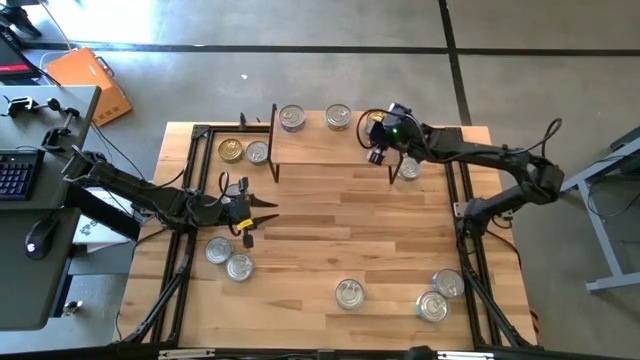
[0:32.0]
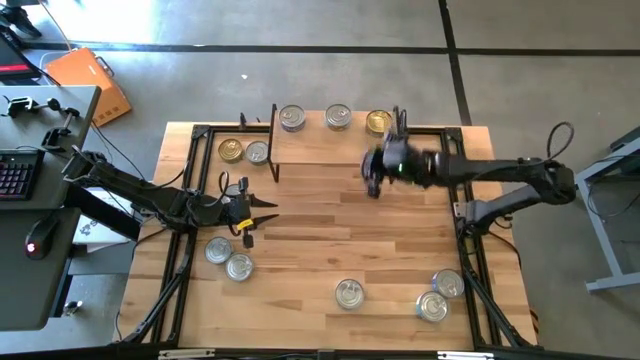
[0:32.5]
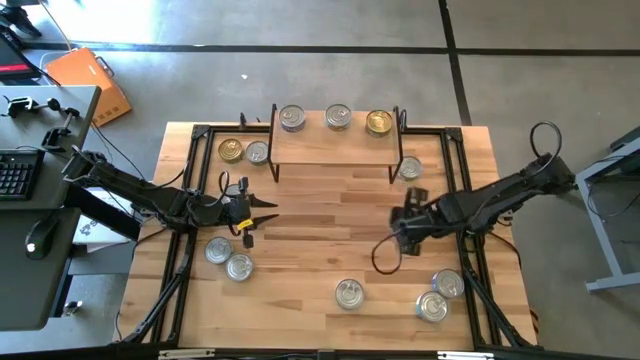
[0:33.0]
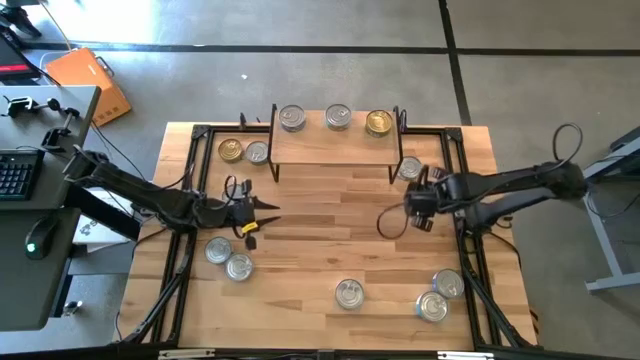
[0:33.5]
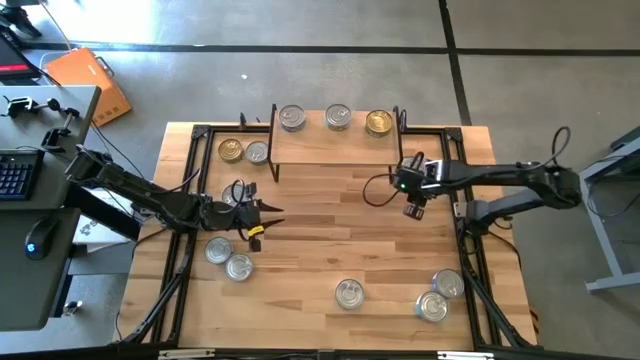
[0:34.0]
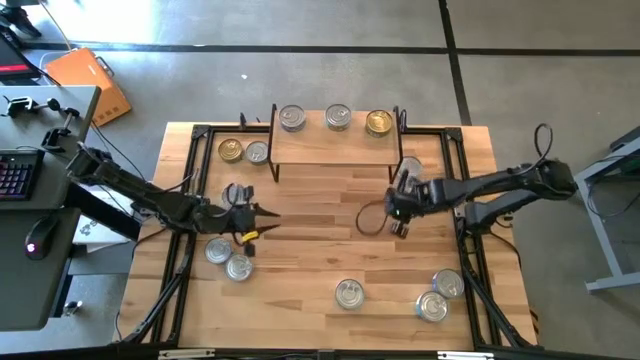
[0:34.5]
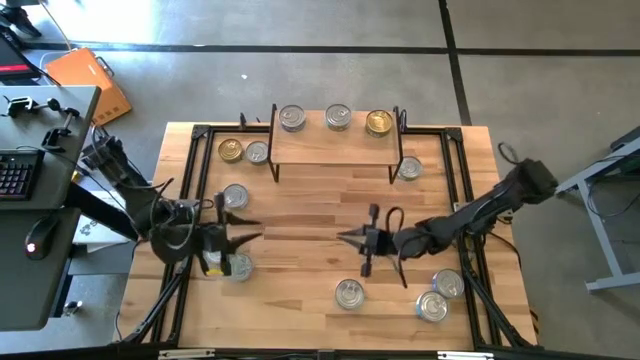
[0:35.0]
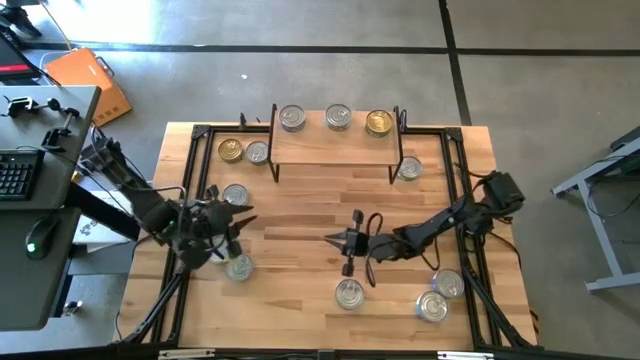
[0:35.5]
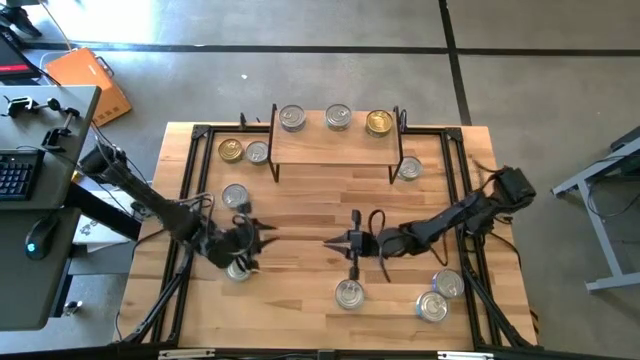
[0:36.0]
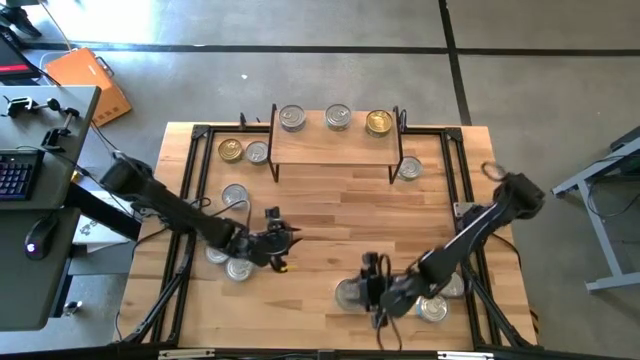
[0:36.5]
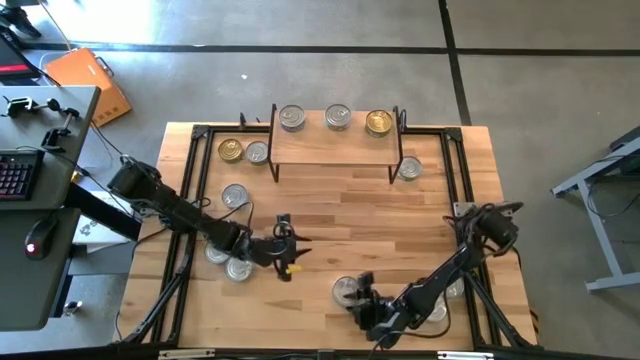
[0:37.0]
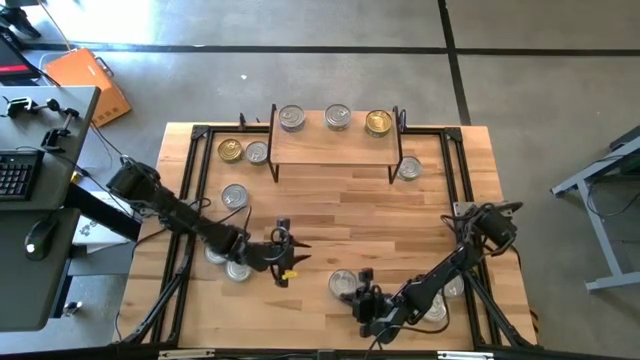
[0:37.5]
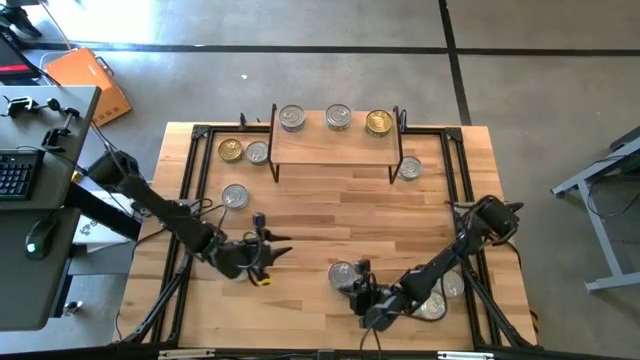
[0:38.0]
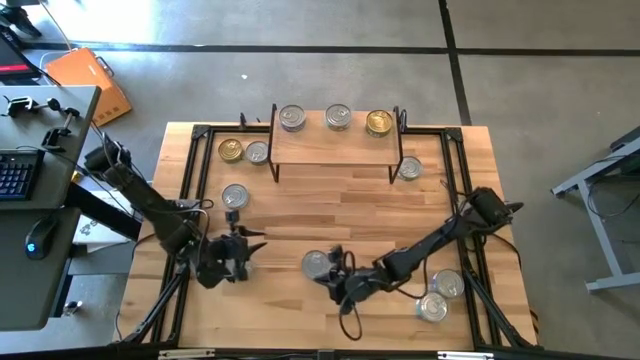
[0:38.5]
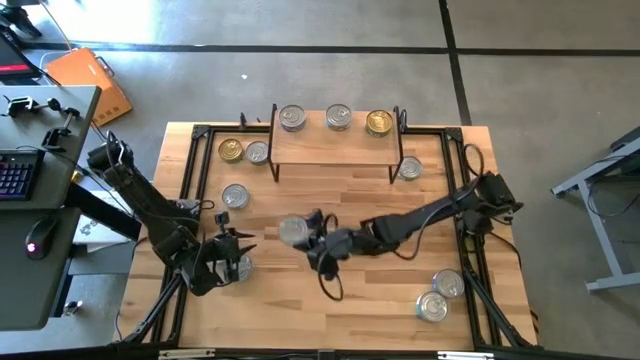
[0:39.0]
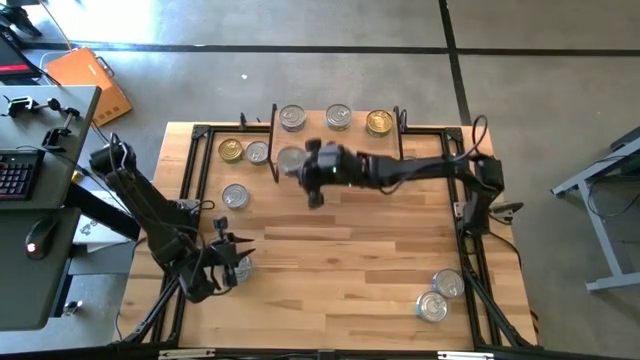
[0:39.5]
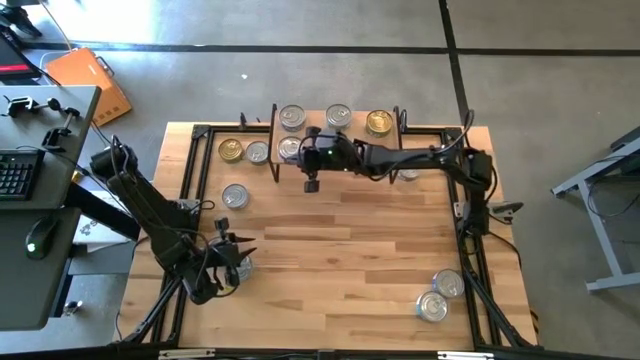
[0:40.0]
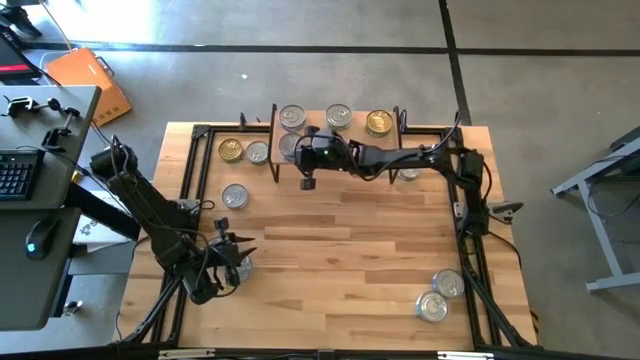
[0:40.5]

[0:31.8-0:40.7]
Task: Stack canned seafood by type on shelf
Put the blue tuna can on the shelf

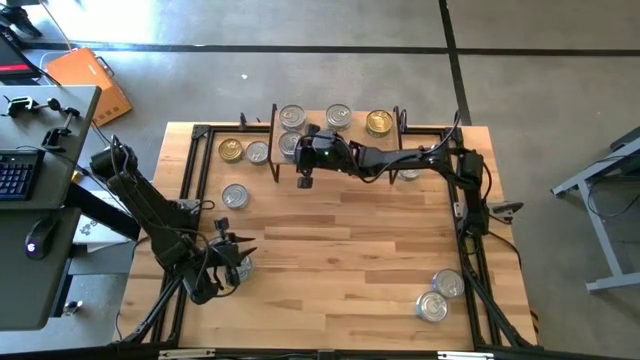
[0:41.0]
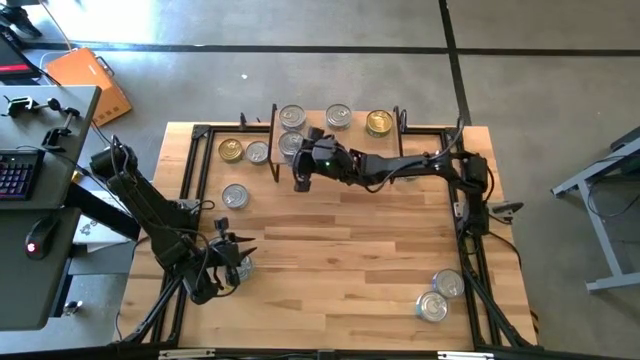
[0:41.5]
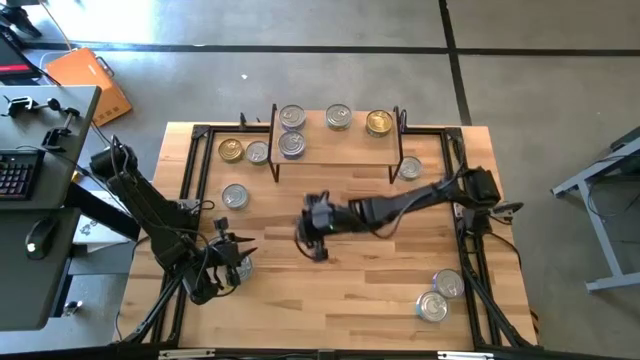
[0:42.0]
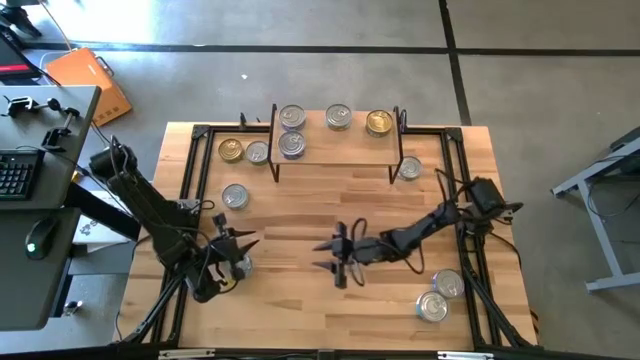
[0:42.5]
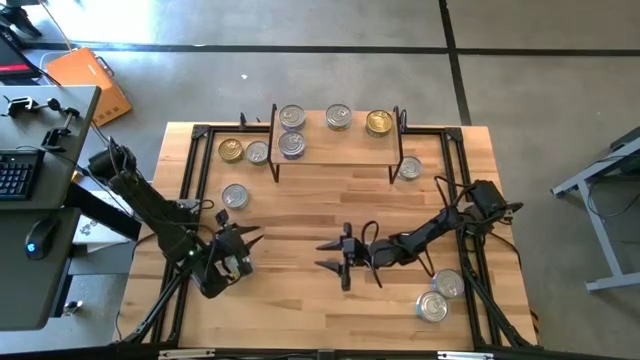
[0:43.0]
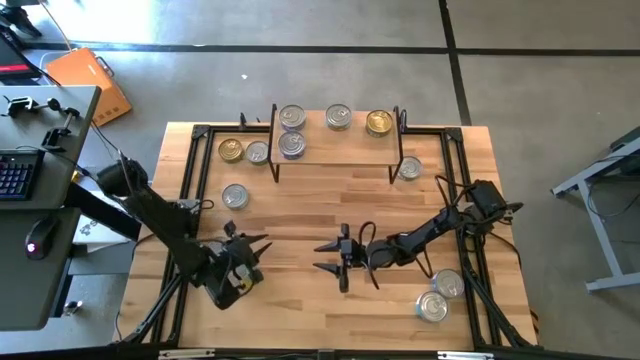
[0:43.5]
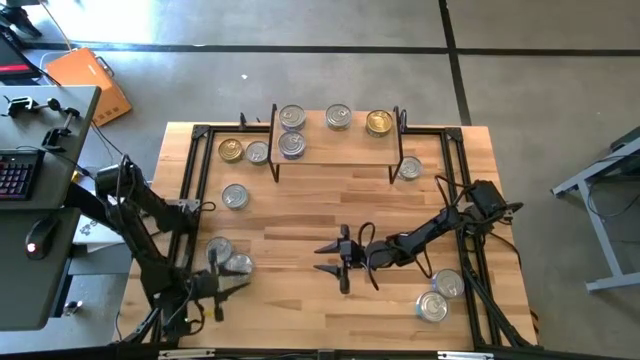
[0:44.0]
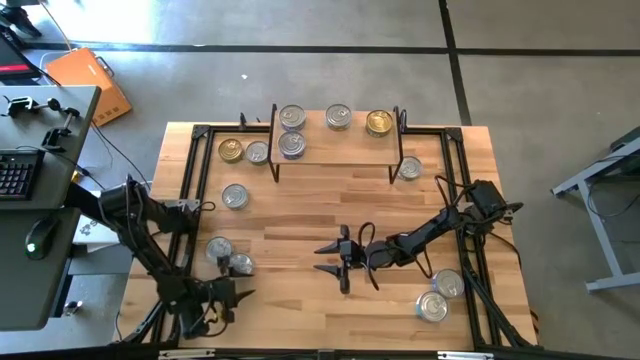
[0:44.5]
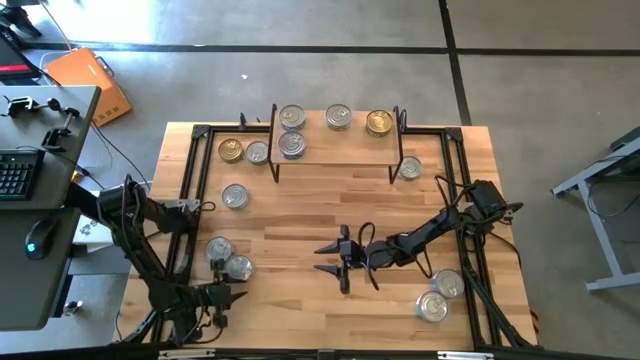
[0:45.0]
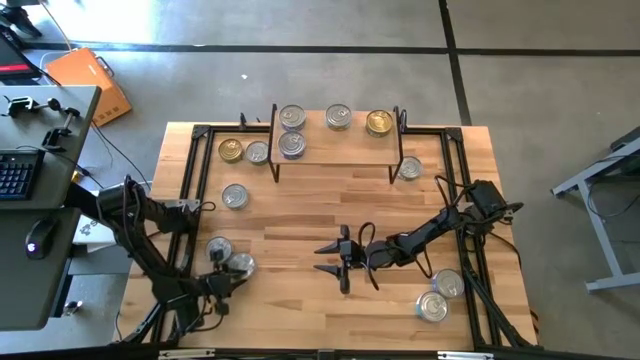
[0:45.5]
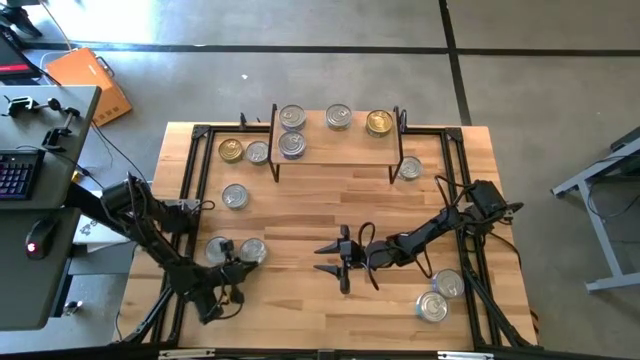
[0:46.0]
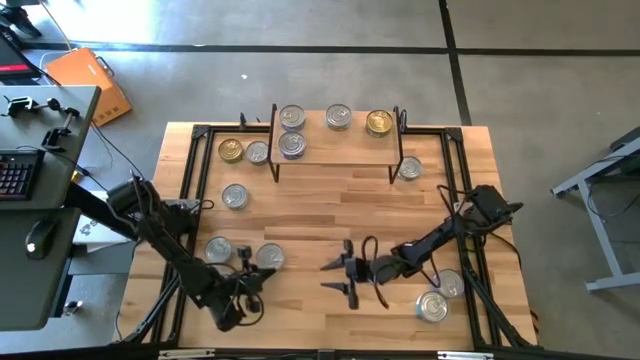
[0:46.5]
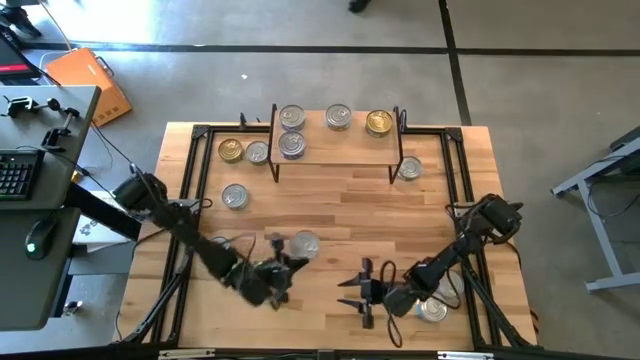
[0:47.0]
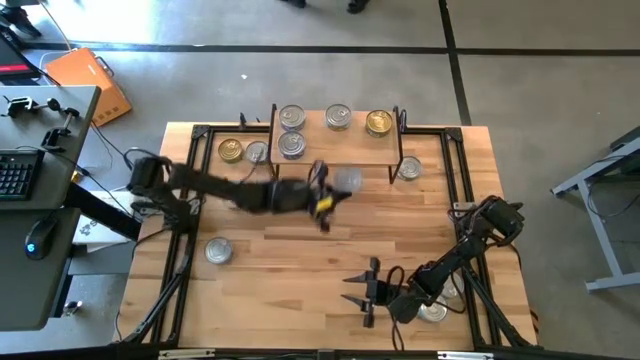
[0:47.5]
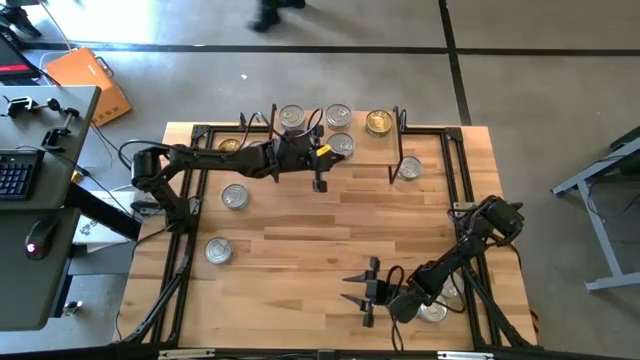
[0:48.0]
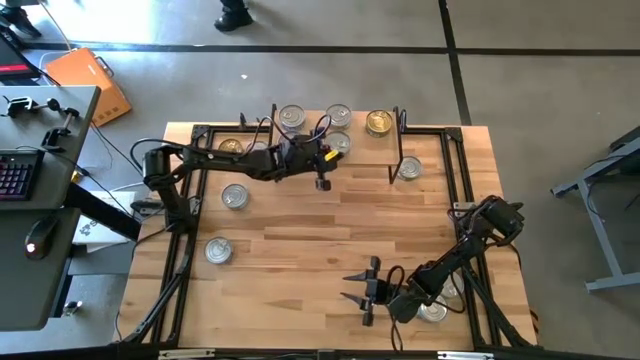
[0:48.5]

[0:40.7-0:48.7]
Put the yellow-blue tuna can on the shelf

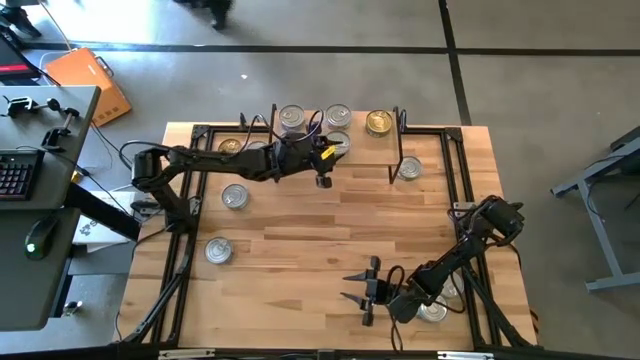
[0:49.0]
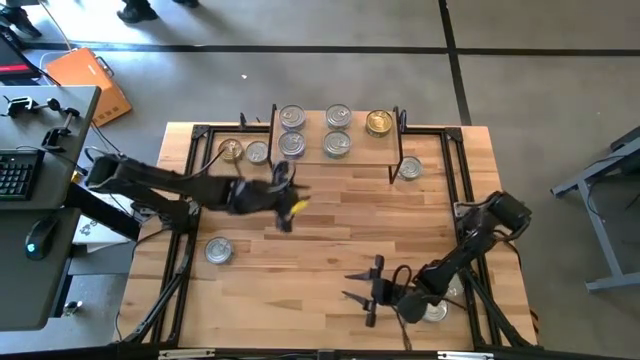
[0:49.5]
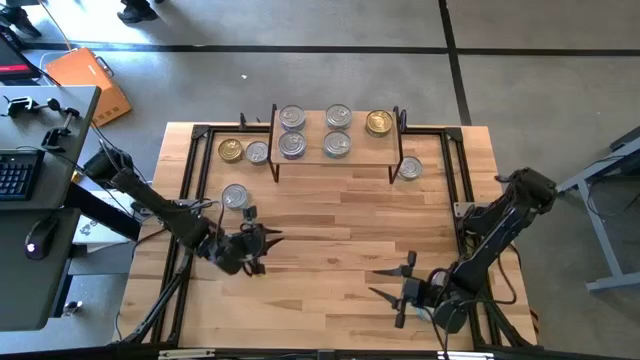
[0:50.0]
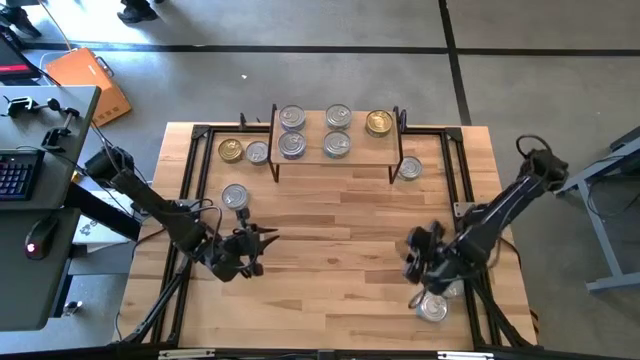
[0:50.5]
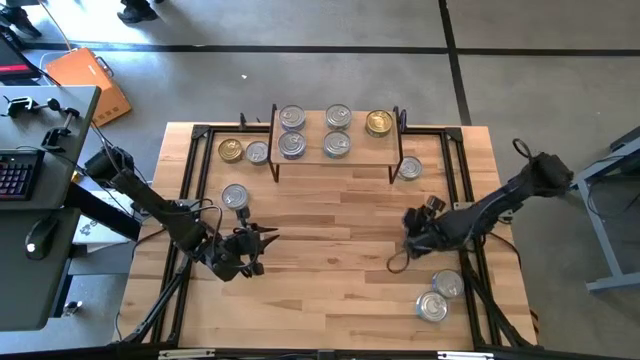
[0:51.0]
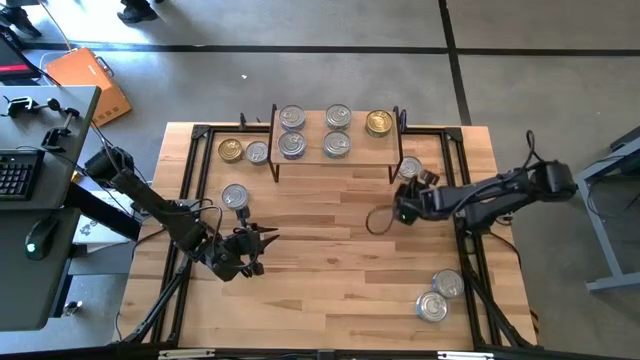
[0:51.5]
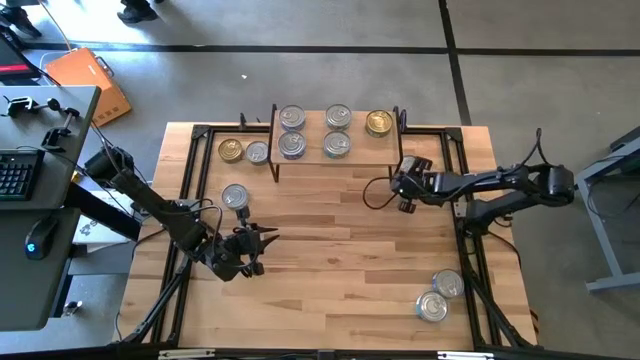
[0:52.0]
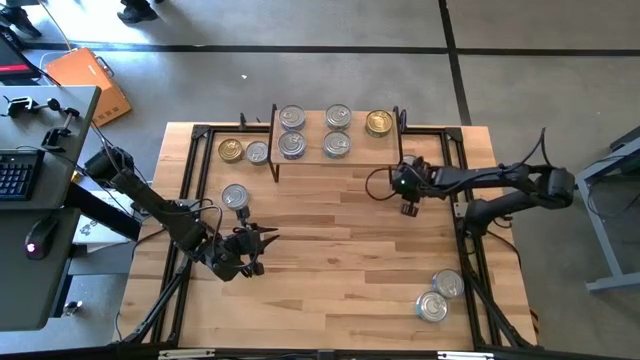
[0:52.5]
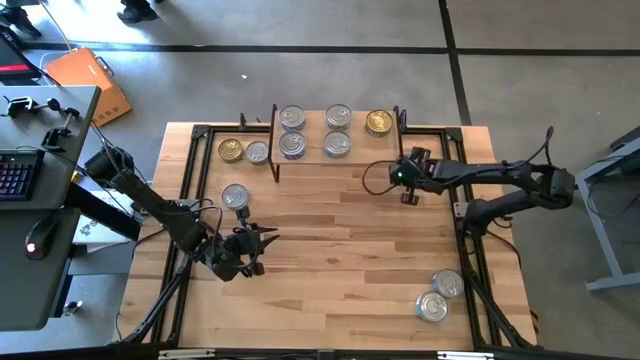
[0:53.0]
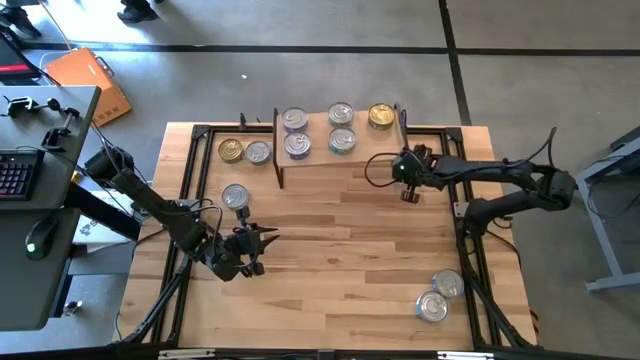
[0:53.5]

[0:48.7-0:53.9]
Put the green tuna can on the shelf

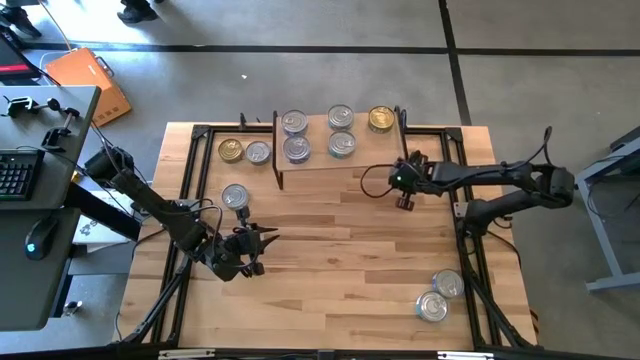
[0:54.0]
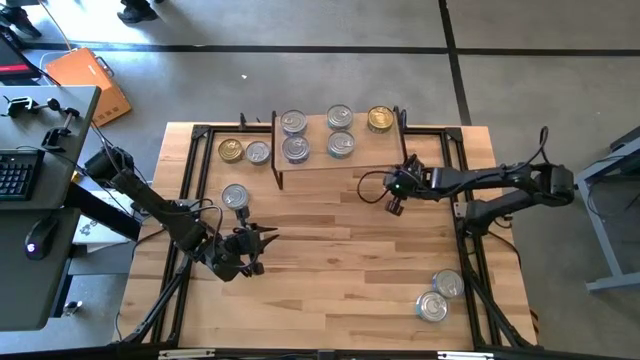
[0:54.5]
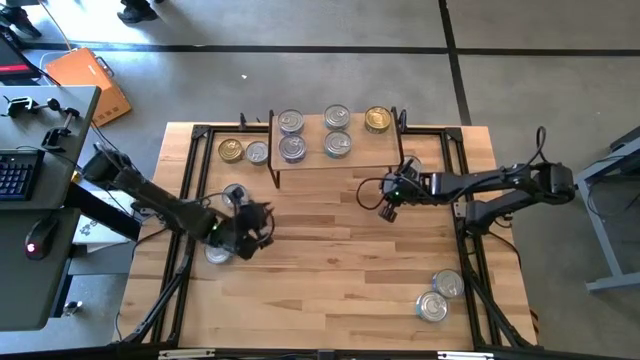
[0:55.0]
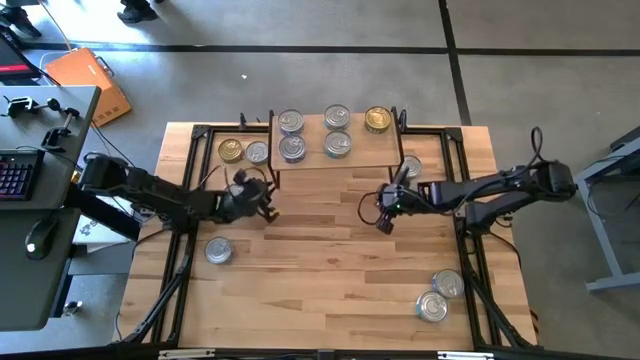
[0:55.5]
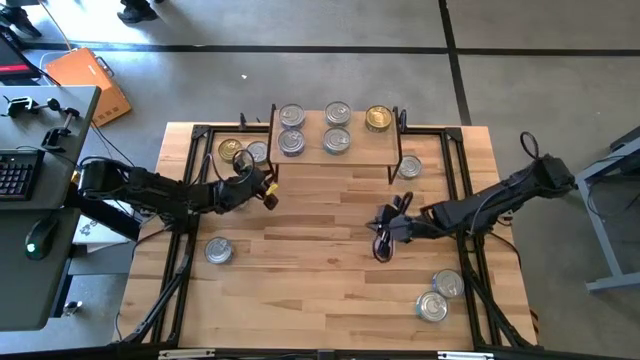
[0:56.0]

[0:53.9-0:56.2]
Adjust the shelf on the table
